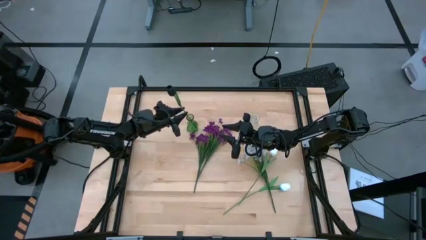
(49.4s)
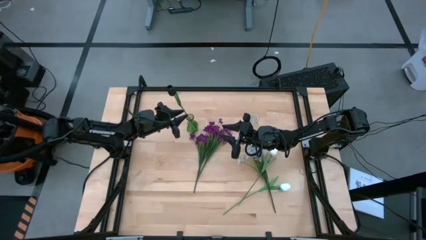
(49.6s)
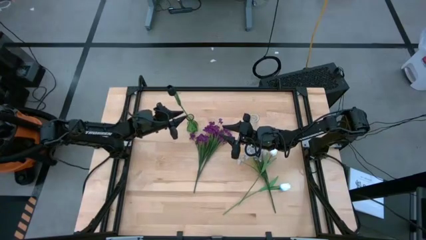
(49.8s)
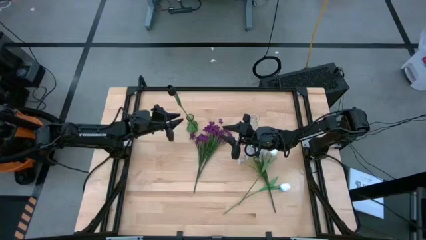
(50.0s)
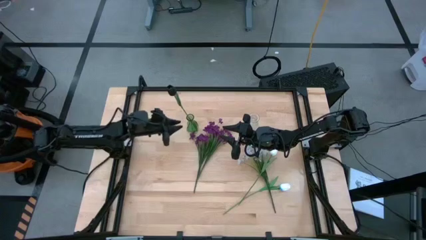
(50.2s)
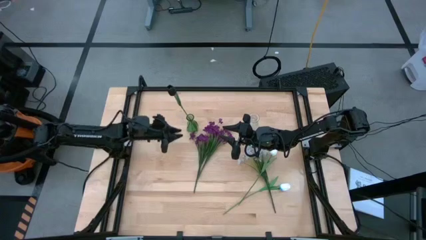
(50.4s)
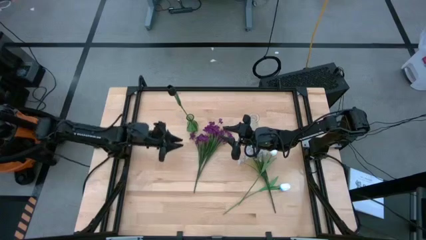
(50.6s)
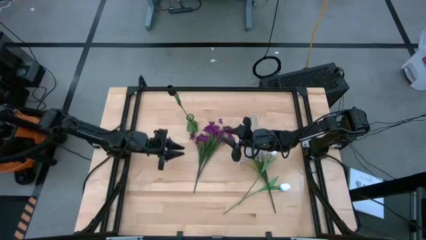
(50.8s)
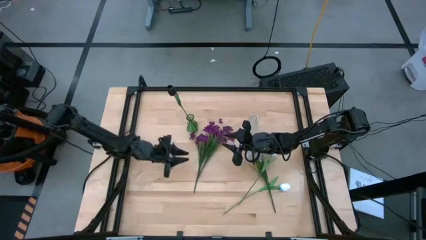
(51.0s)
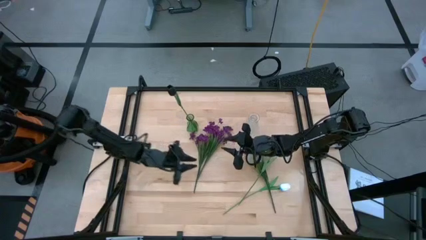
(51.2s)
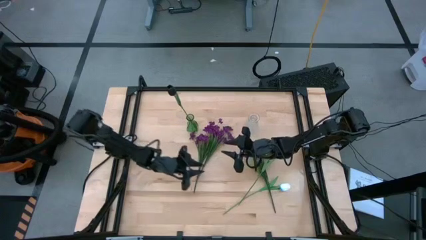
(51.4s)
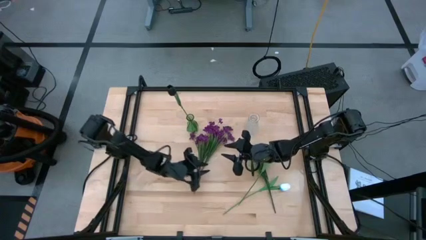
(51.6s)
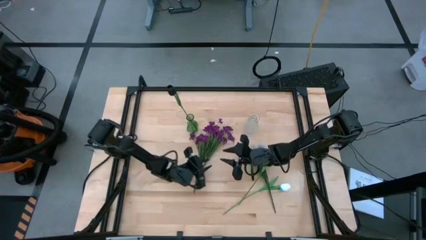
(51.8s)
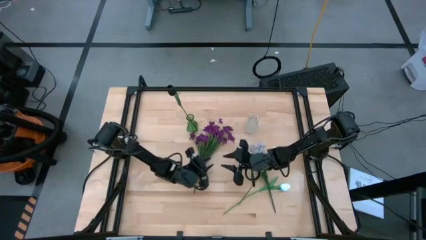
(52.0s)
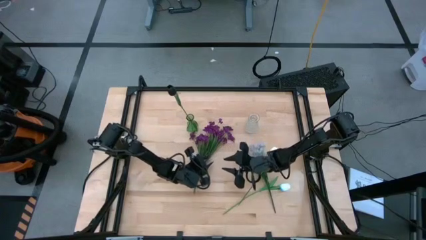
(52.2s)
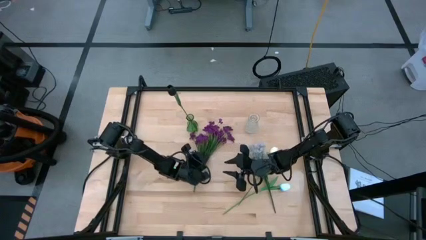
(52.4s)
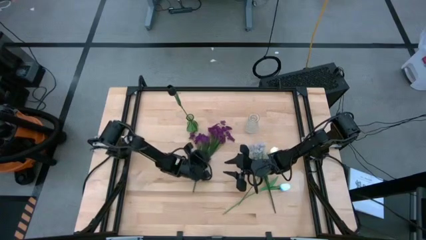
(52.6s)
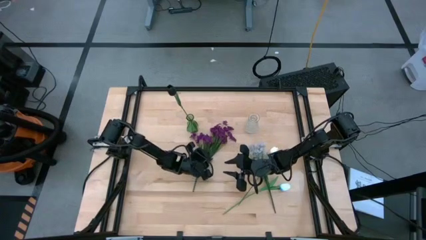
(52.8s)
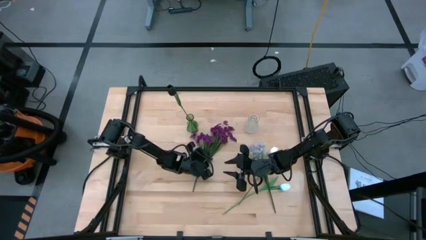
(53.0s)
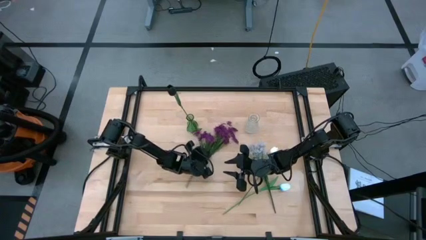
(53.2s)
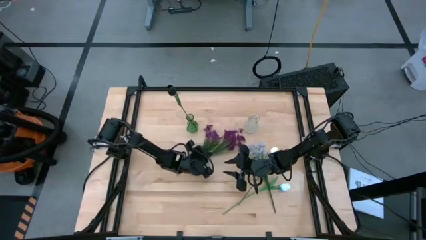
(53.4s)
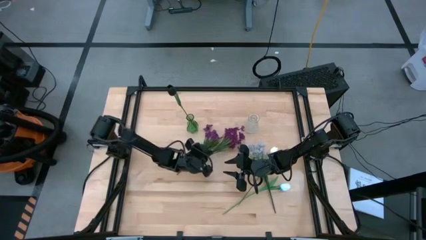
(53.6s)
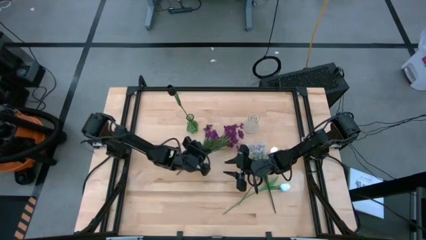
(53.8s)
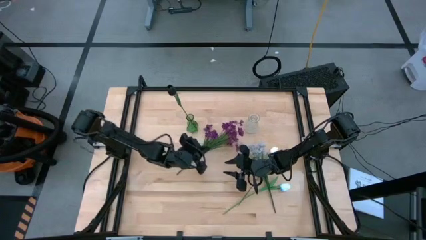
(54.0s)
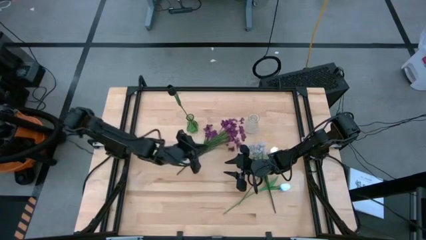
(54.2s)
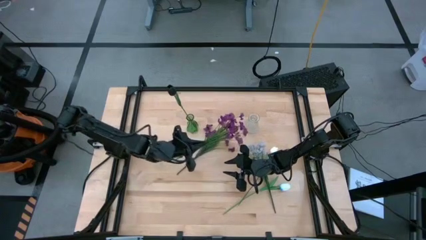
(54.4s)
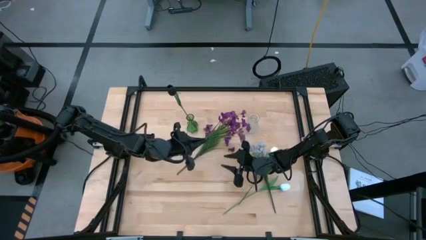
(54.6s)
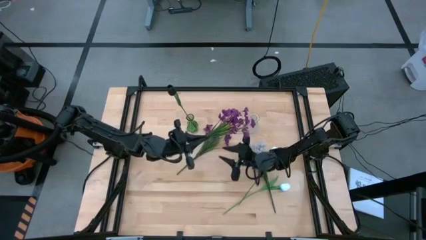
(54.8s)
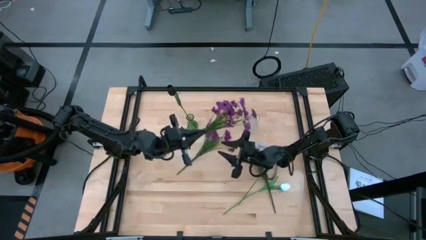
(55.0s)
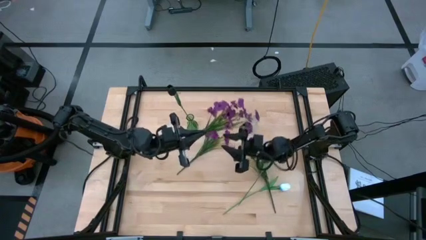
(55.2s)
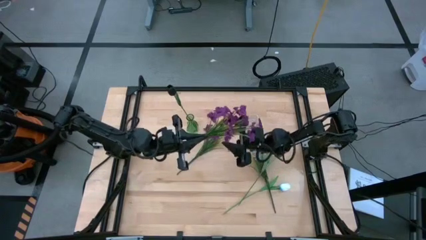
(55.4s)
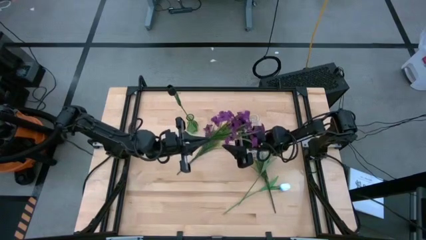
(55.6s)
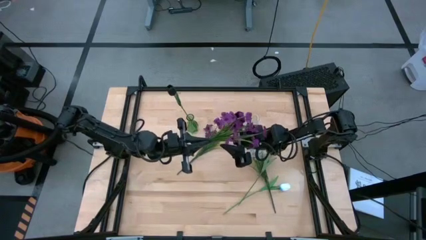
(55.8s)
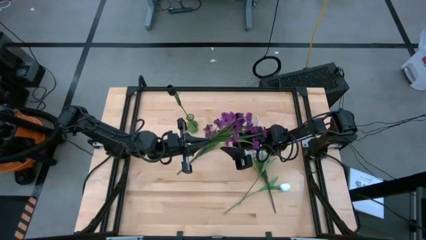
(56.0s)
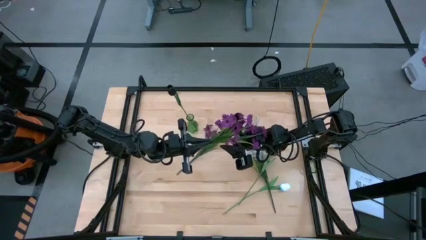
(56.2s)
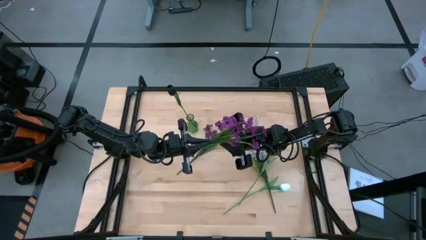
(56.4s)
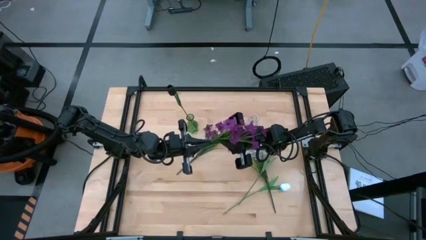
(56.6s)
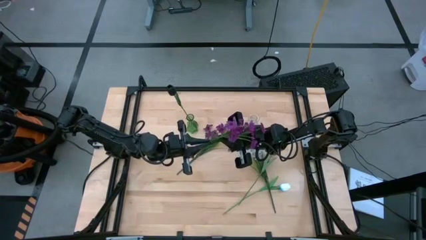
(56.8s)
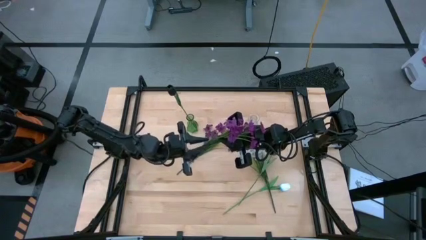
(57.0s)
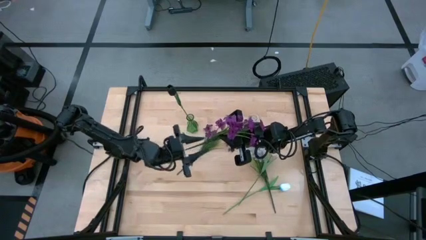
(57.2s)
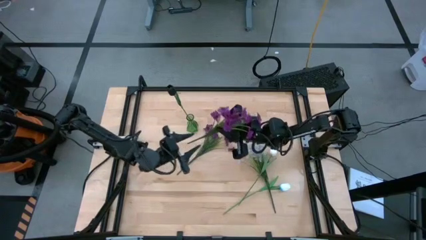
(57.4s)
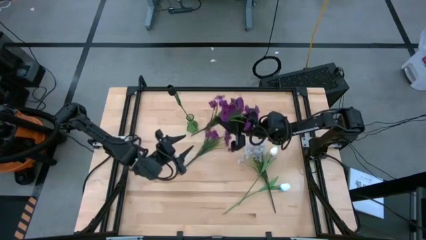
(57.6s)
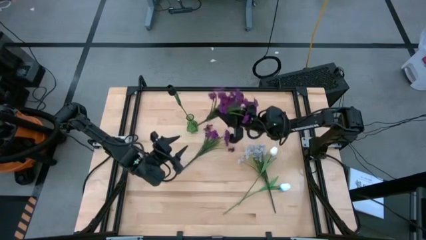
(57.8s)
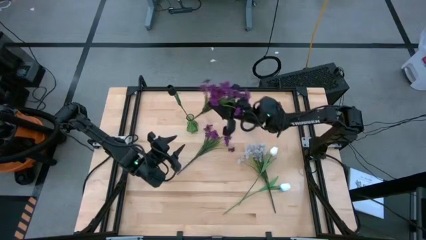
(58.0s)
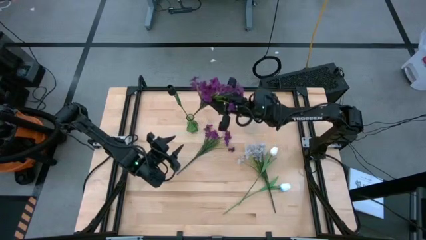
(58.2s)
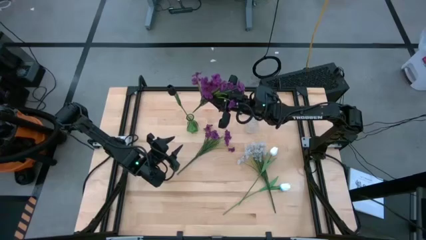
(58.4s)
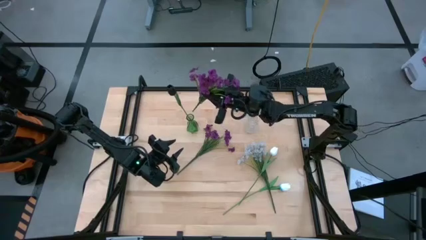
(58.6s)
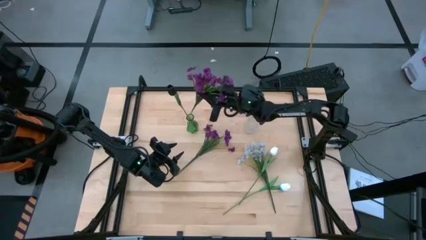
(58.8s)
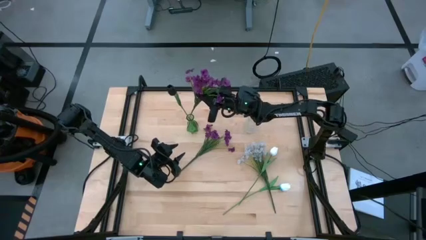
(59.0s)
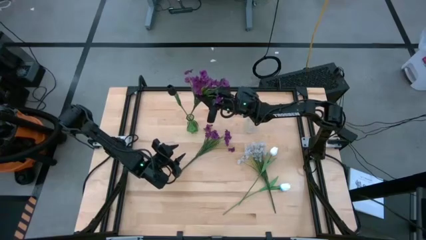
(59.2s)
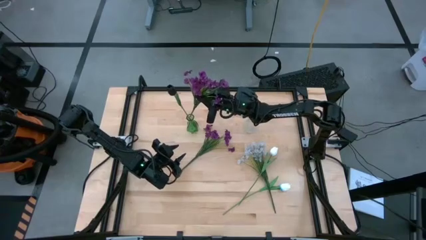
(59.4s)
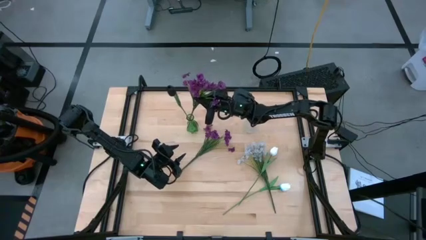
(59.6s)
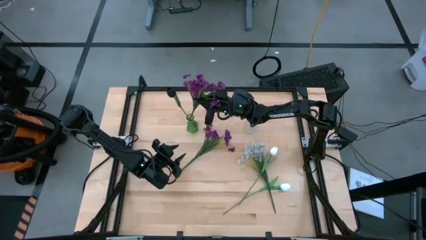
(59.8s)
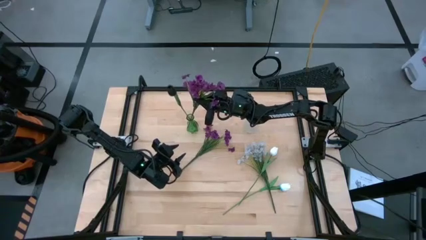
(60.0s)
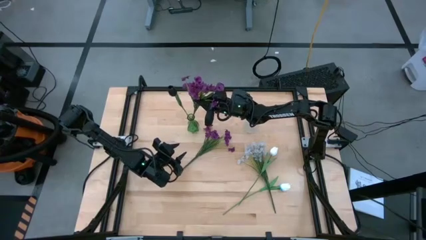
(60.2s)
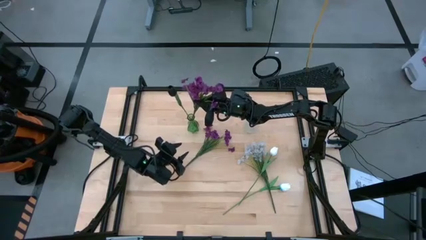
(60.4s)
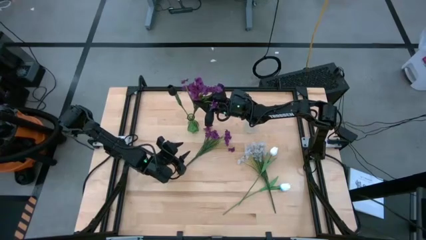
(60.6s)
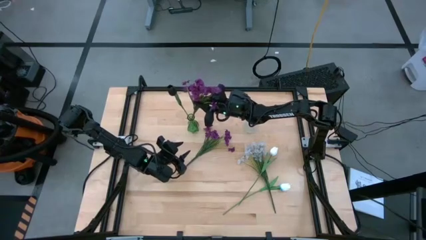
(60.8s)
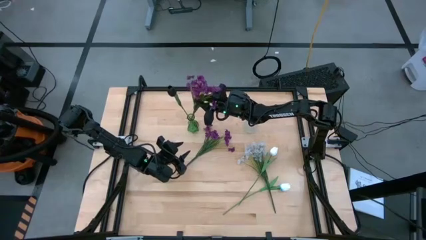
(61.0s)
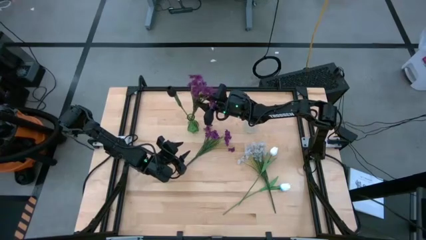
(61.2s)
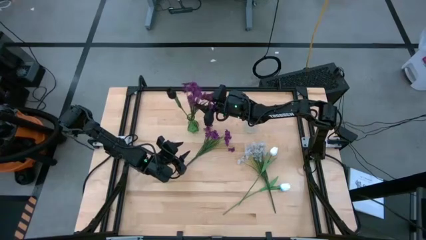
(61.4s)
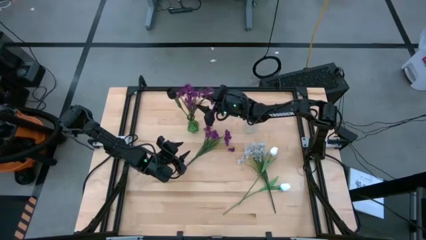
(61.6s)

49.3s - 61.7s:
Task: Sort flowers into vase by color
Put the right purple flowers into the green vase

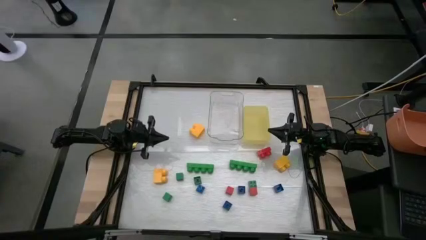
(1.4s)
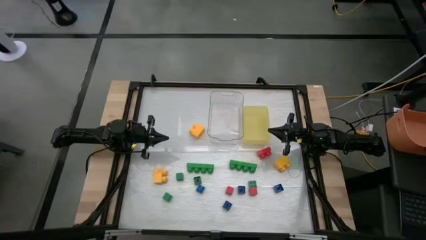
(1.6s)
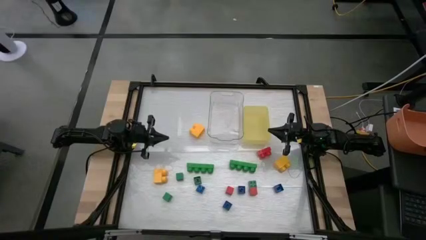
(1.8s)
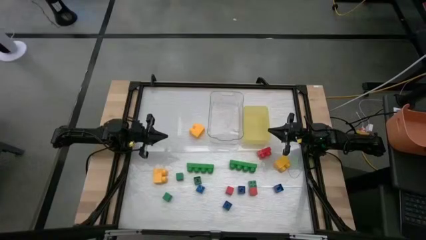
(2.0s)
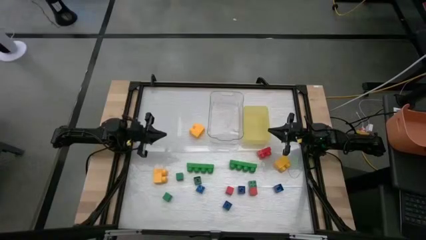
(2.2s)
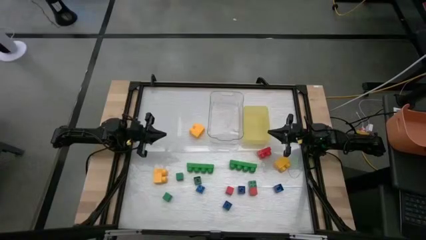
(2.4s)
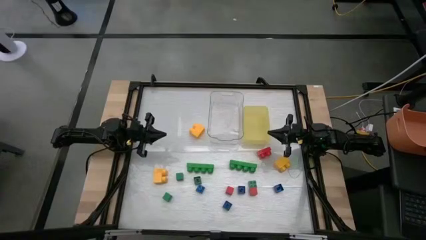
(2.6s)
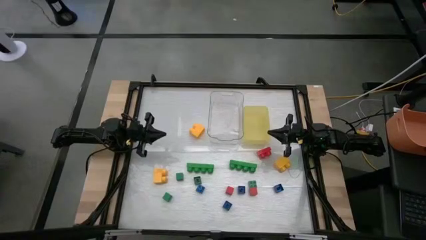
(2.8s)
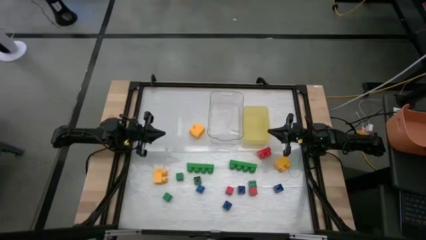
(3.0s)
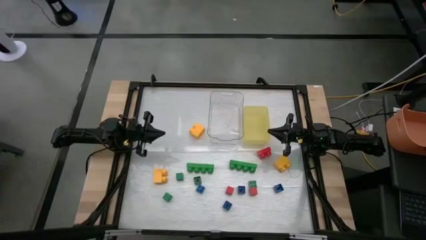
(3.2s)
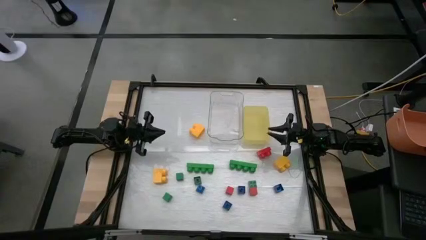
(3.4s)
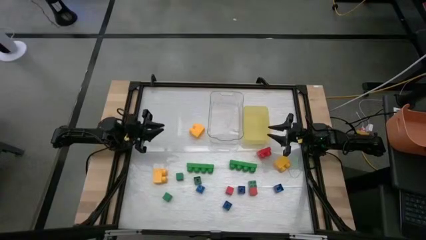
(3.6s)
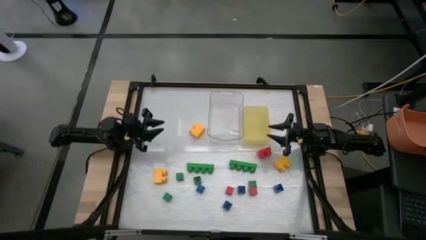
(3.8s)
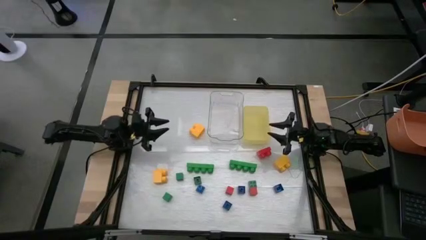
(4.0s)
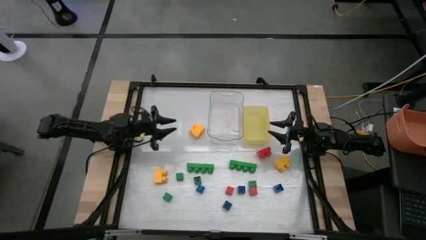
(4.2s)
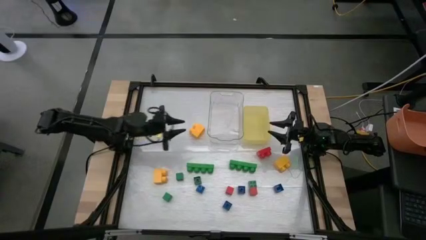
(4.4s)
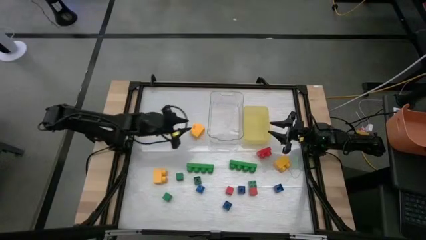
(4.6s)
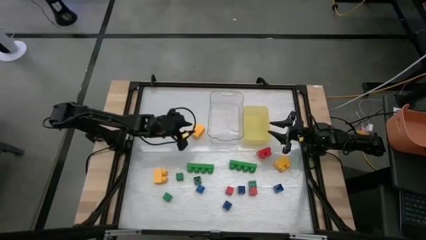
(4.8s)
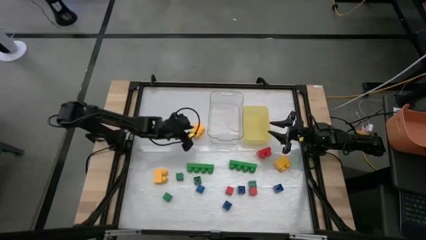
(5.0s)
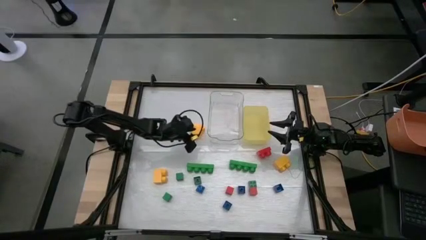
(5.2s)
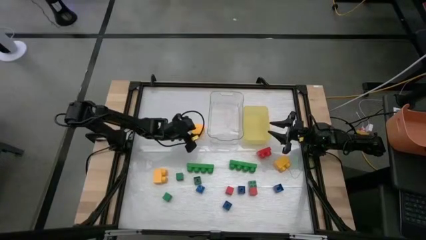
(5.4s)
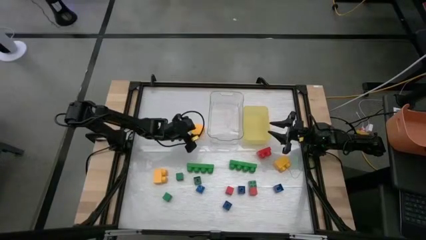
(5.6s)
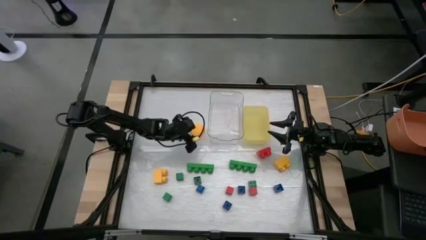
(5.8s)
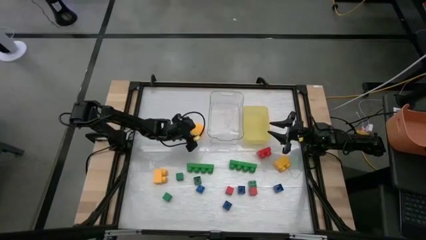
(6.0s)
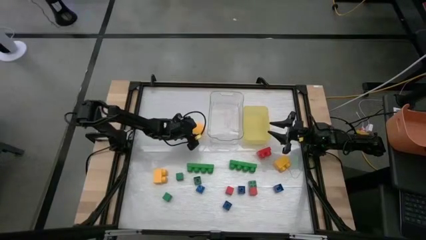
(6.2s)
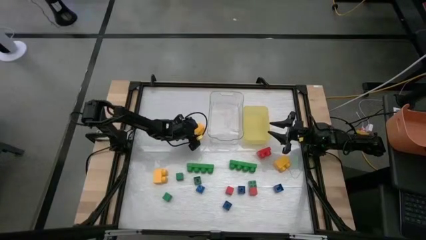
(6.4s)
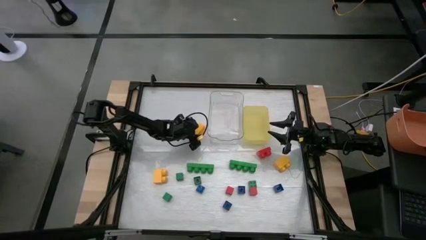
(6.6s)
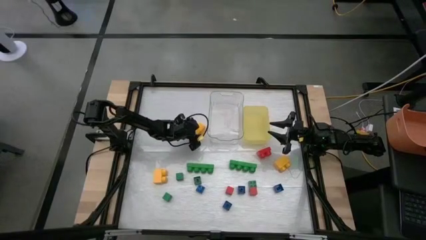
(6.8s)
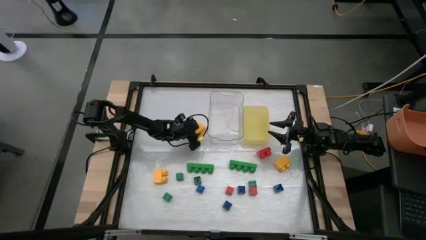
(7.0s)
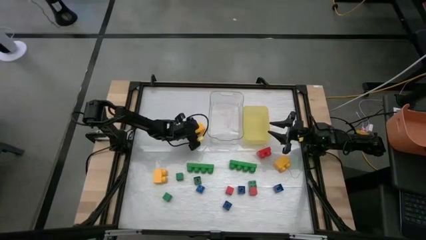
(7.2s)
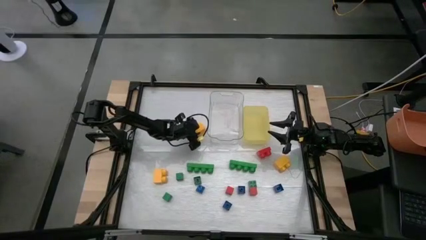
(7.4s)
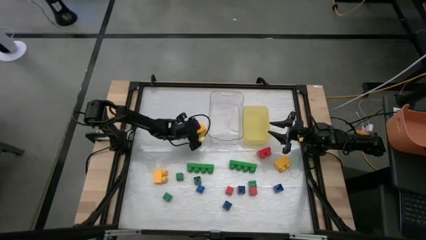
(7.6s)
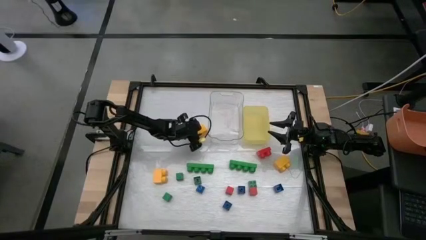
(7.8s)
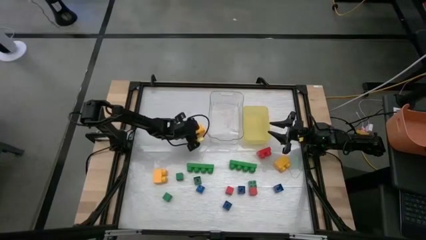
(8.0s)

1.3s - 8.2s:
Task: Sort blocks by size
Put the large yellow game piece into the transparent bin
